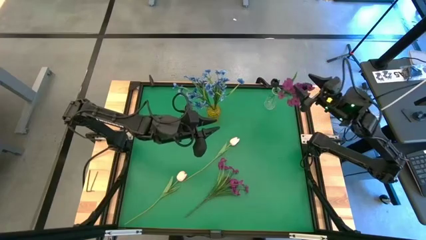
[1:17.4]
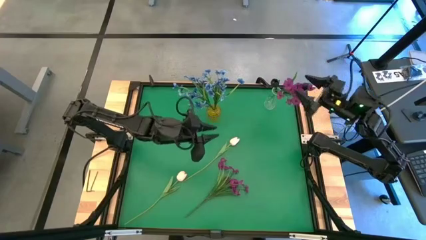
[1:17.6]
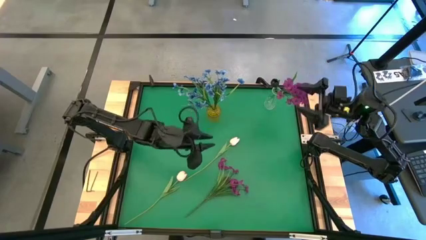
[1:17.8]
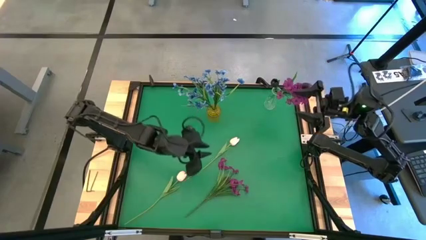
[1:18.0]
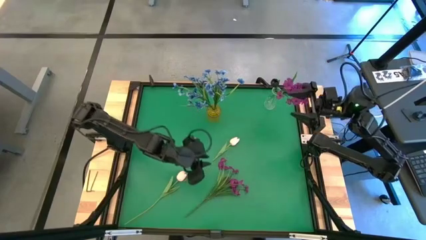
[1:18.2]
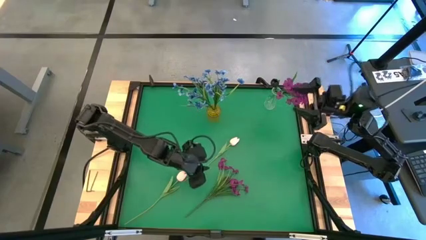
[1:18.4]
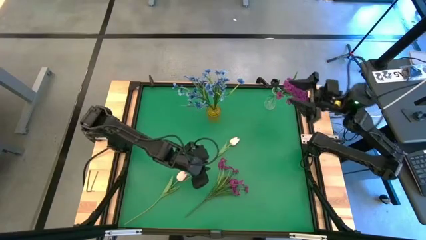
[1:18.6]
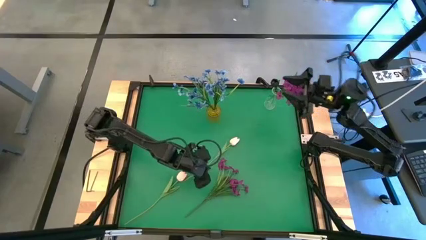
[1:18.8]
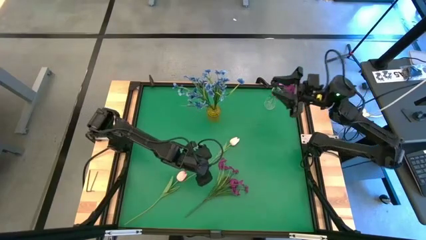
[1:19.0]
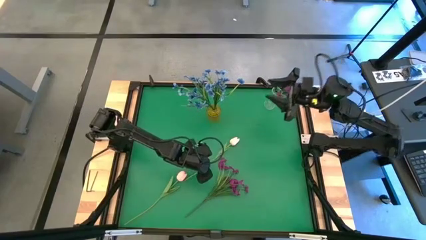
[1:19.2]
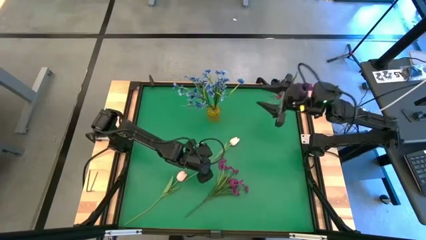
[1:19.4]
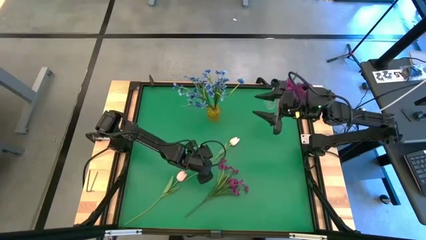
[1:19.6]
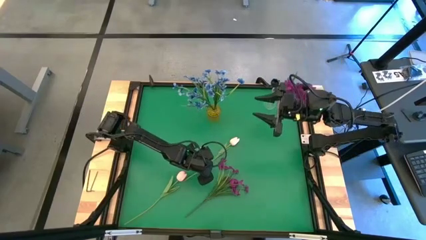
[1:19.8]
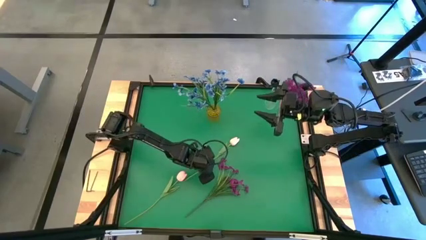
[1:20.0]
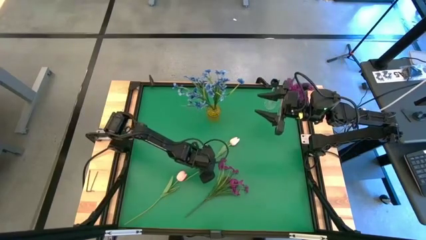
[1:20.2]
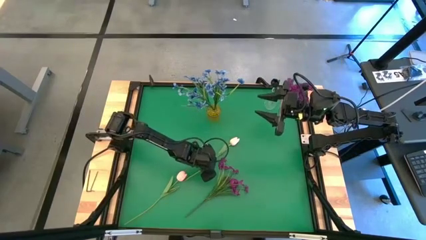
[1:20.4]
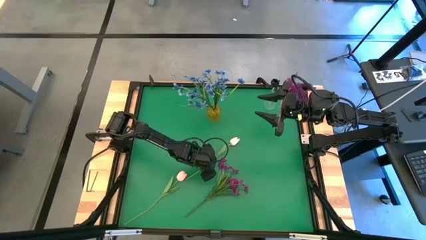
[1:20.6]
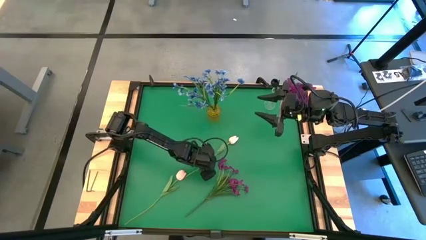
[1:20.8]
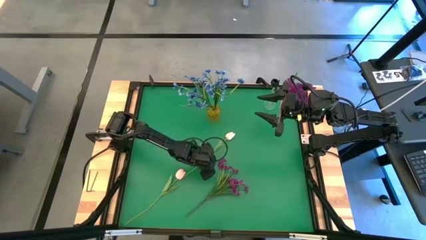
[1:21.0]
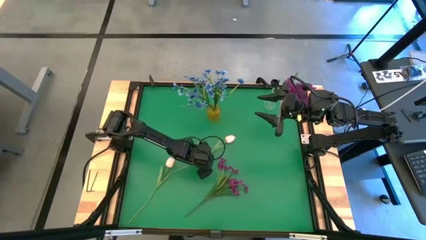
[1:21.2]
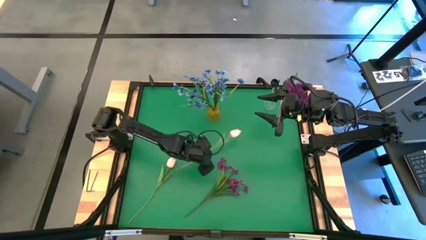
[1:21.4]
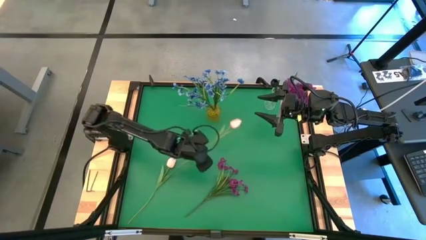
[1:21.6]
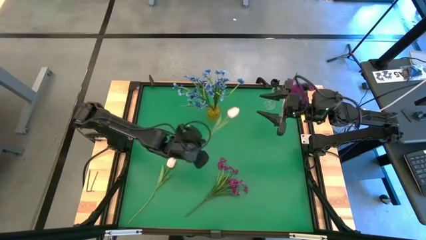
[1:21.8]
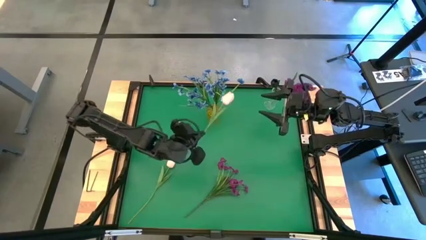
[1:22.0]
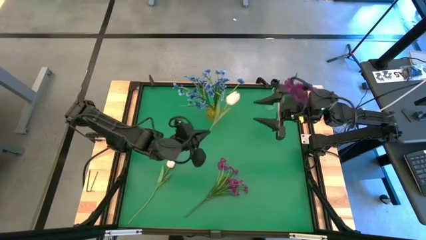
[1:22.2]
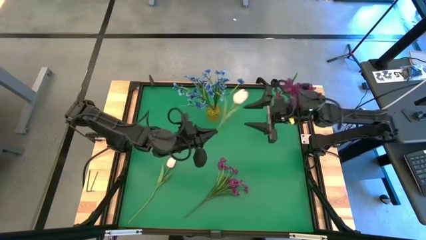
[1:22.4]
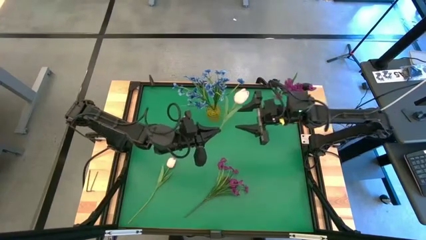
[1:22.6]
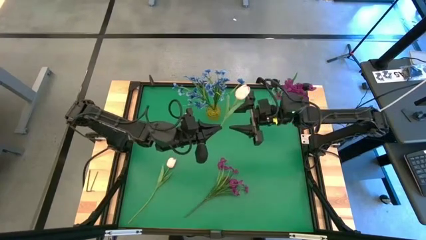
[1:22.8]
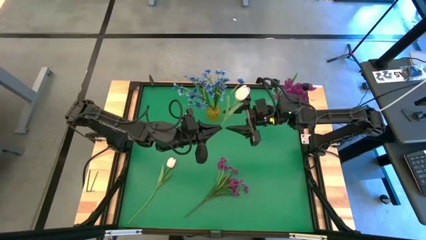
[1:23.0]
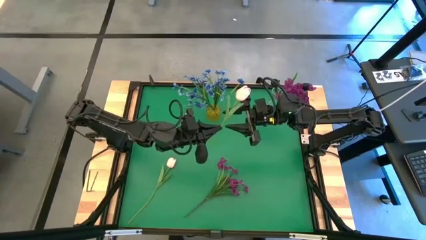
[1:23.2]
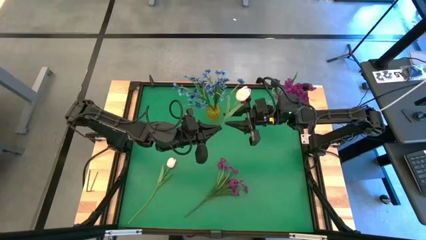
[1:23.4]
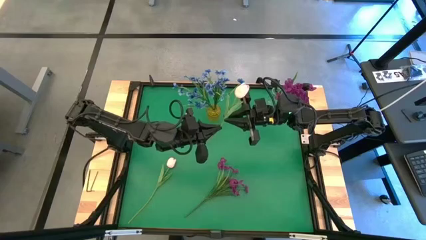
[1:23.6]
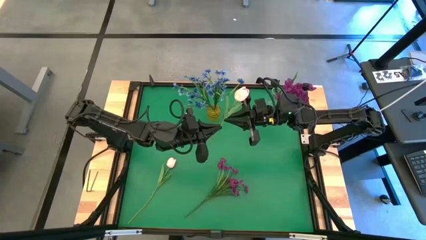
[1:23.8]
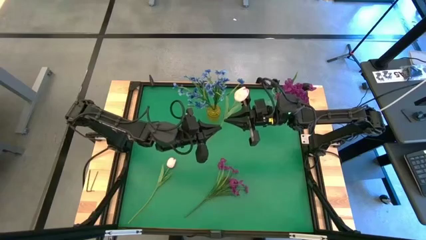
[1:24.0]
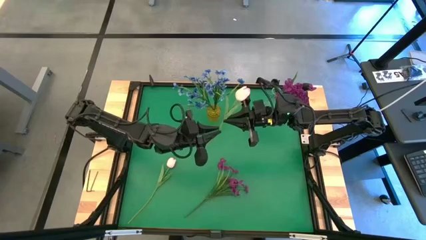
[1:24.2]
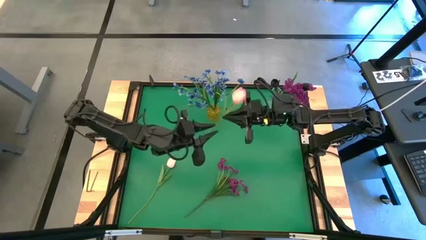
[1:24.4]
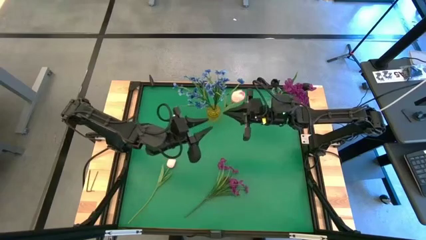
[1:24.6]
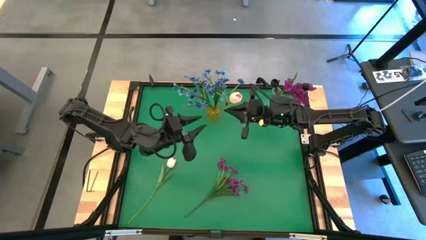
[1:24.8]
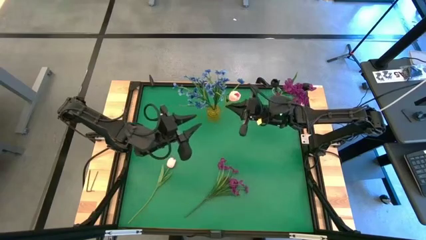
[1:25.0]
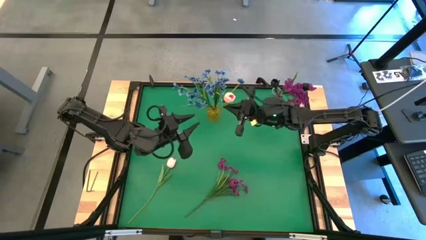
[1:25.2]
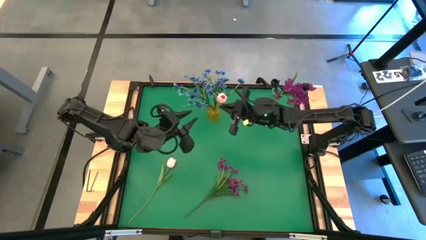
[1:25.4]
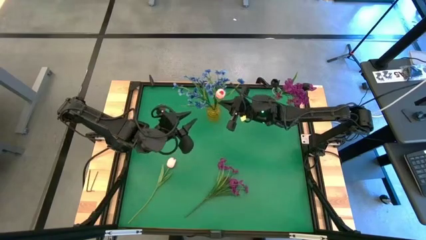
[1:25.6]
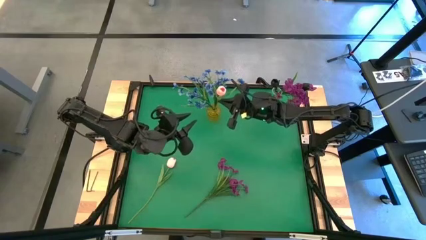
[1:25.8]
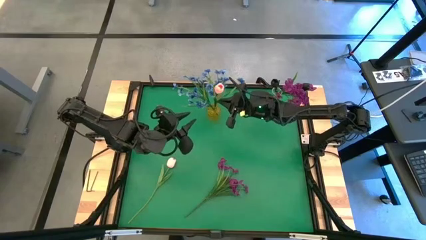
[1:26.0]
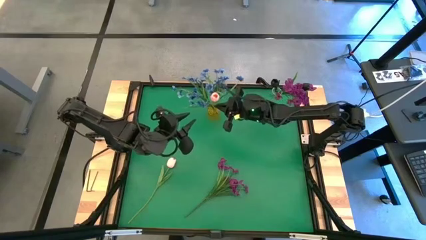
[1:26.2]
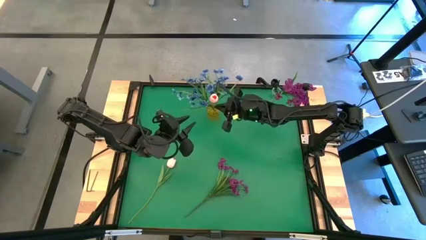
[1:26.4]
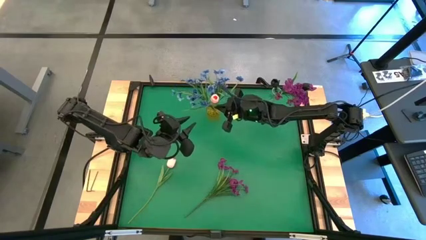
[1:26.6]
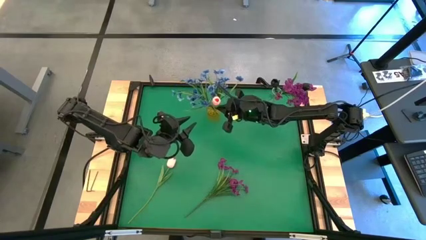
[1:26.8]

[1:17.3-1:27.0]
Task: Sort flowers into vase by color
Put the top pink flower into the yellow vase
